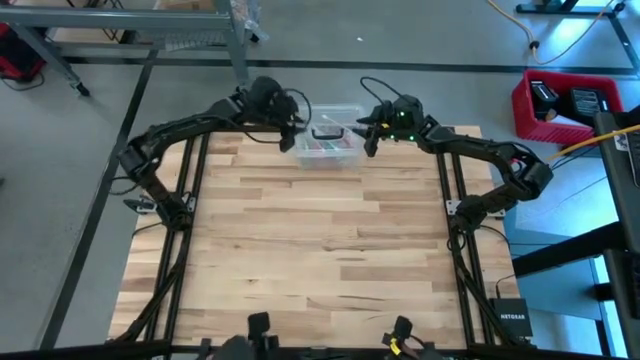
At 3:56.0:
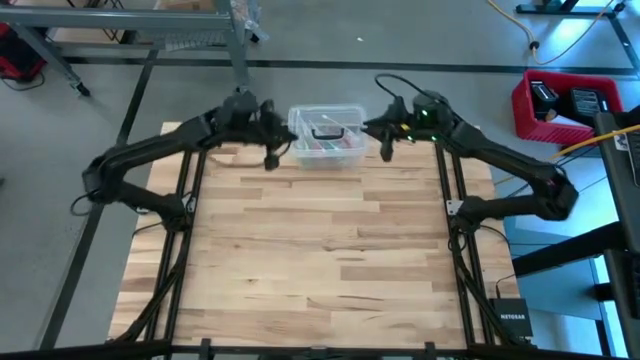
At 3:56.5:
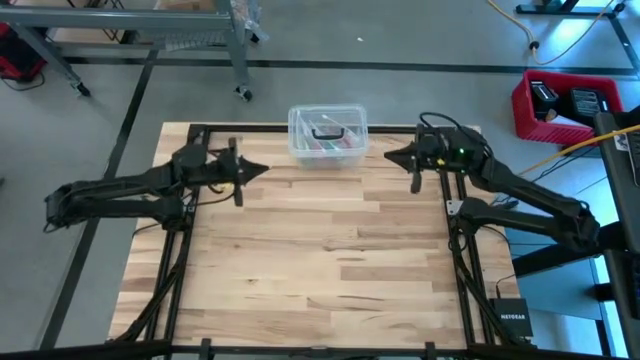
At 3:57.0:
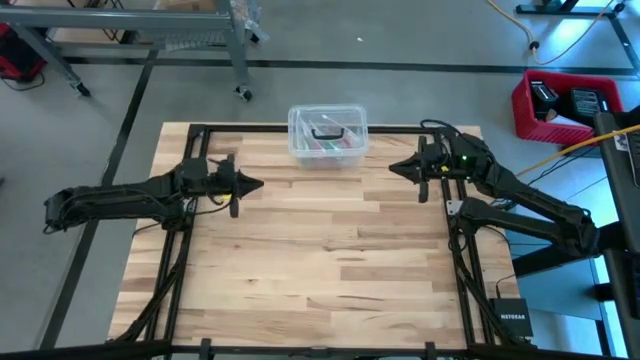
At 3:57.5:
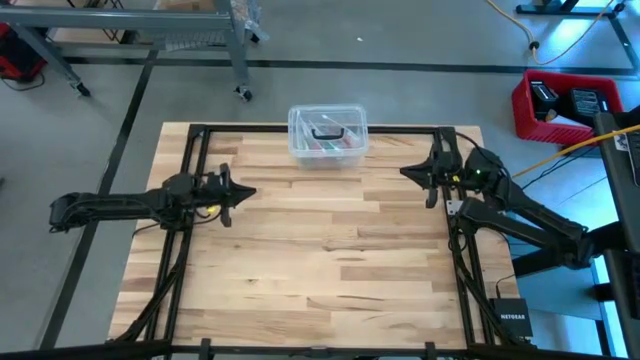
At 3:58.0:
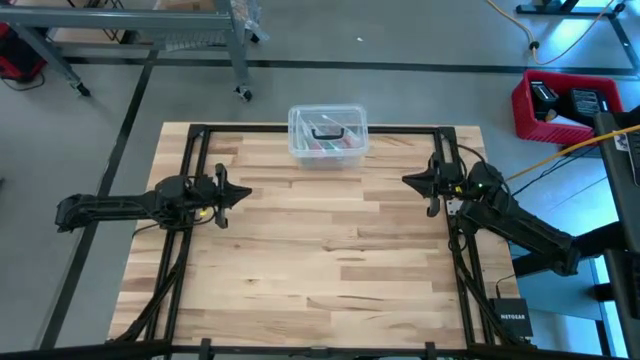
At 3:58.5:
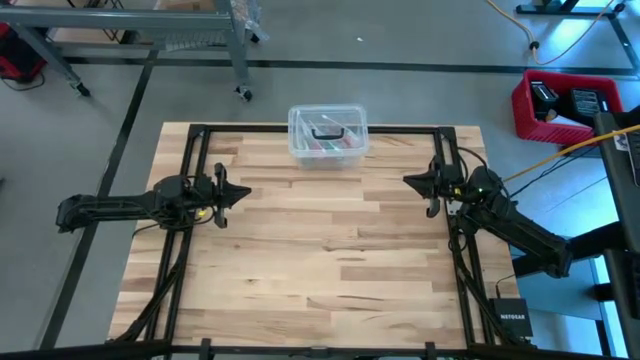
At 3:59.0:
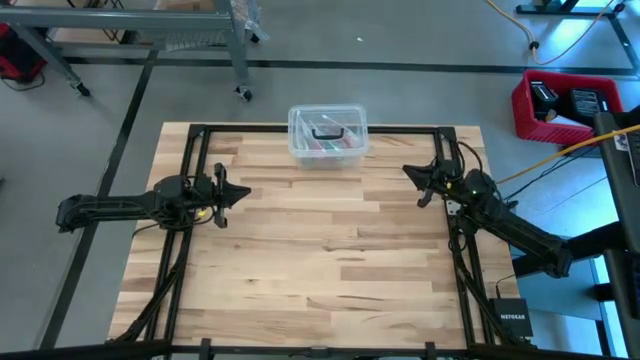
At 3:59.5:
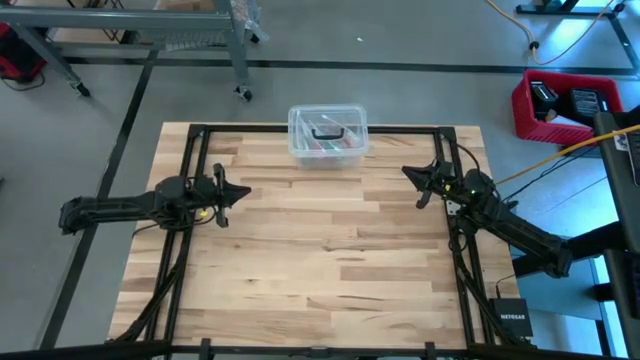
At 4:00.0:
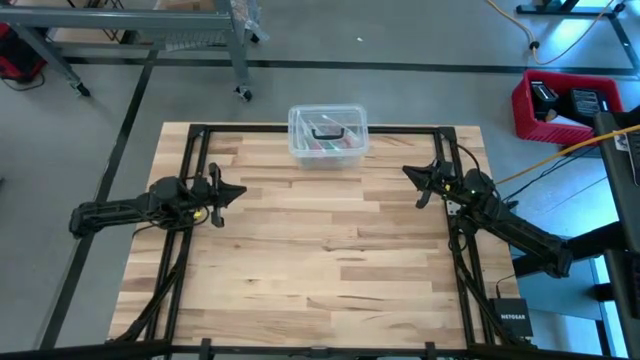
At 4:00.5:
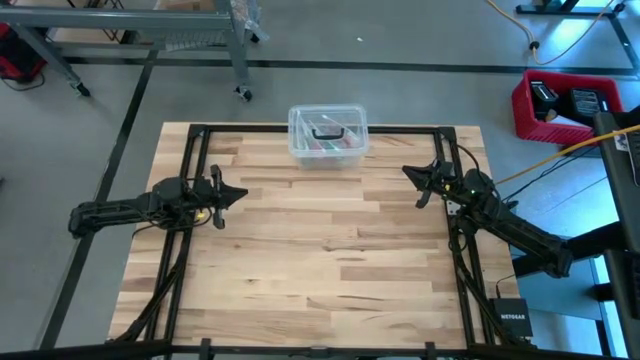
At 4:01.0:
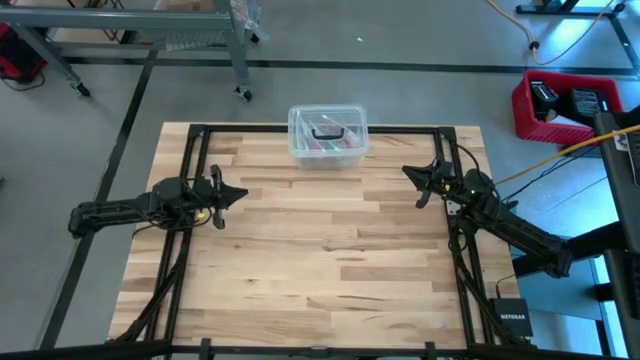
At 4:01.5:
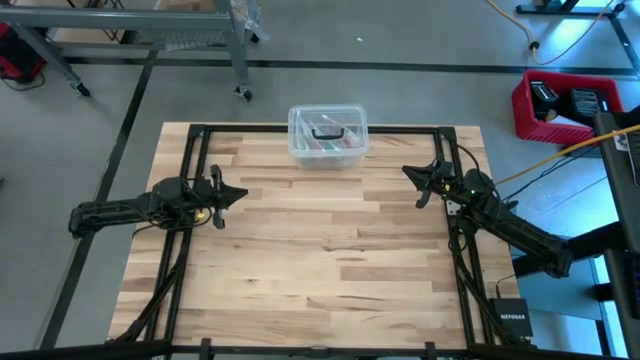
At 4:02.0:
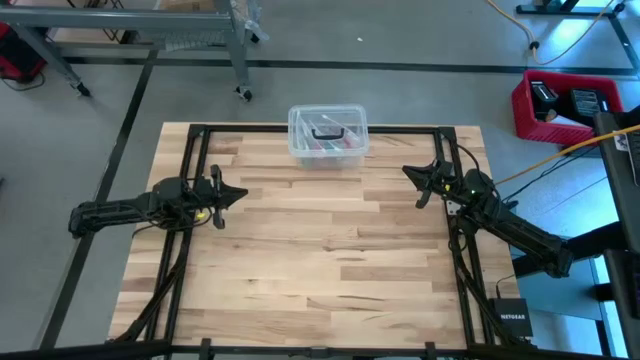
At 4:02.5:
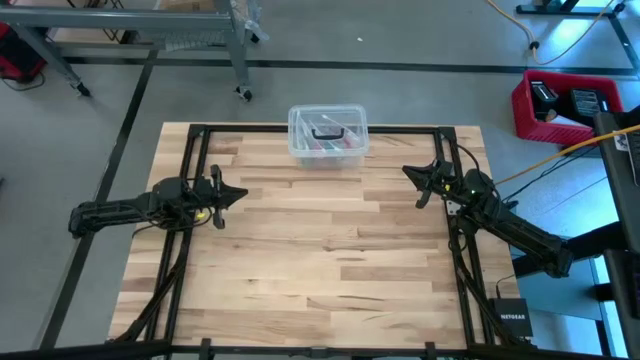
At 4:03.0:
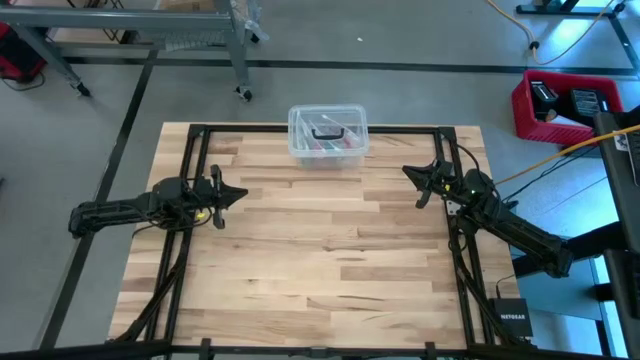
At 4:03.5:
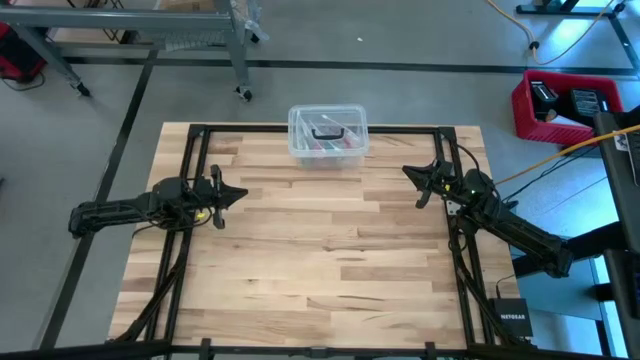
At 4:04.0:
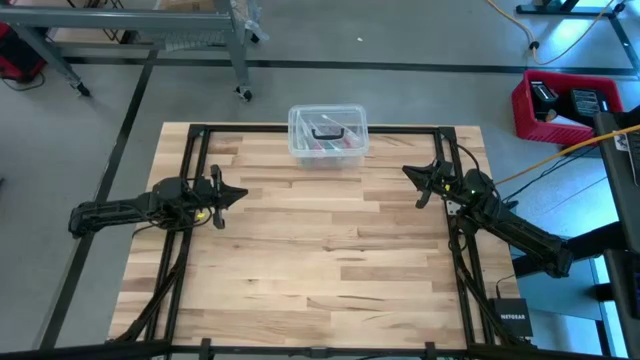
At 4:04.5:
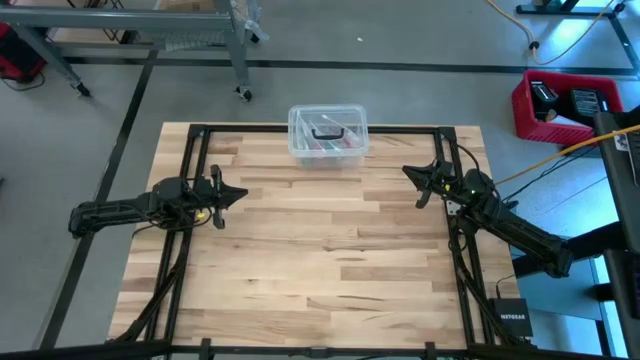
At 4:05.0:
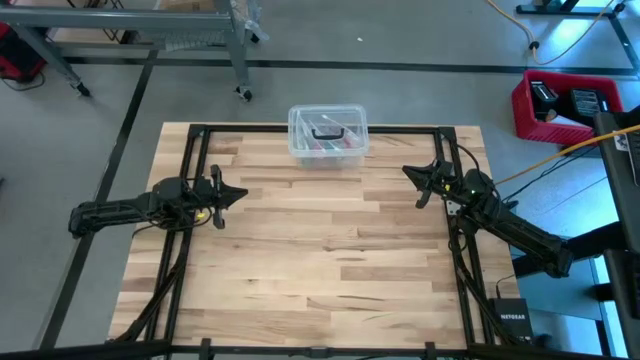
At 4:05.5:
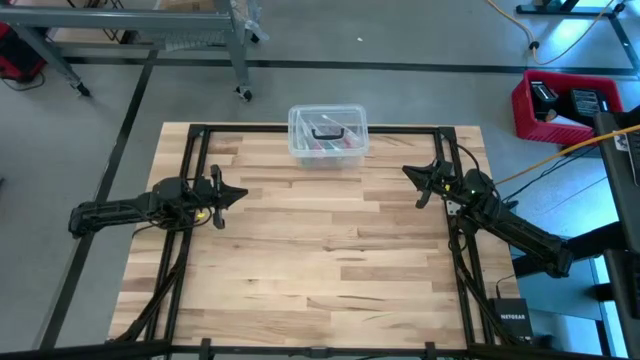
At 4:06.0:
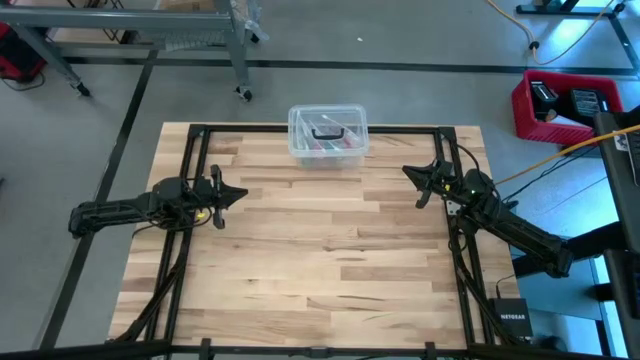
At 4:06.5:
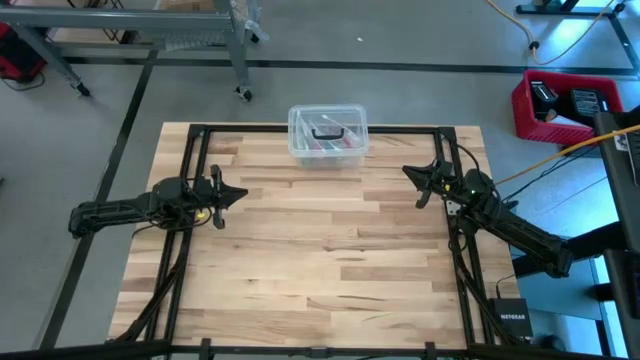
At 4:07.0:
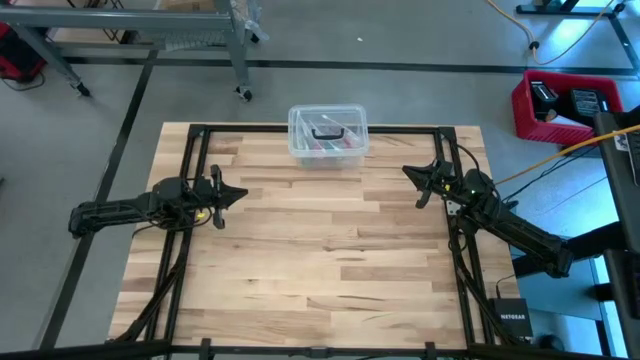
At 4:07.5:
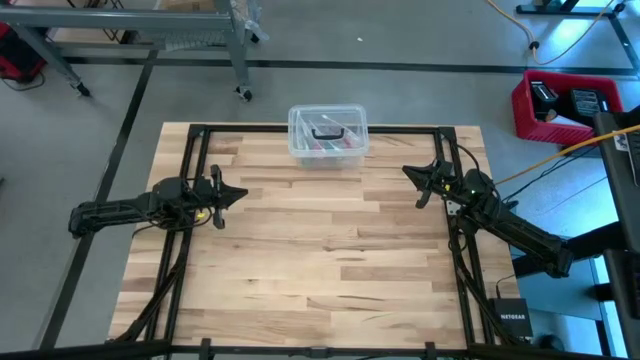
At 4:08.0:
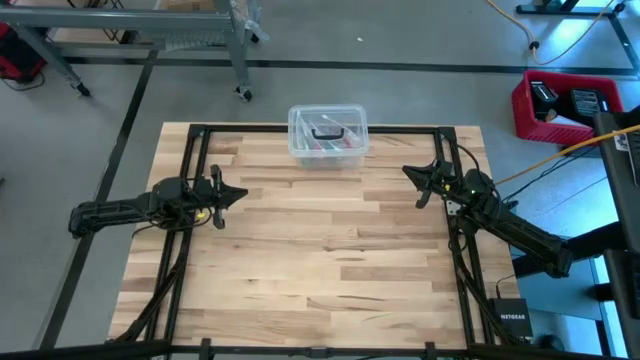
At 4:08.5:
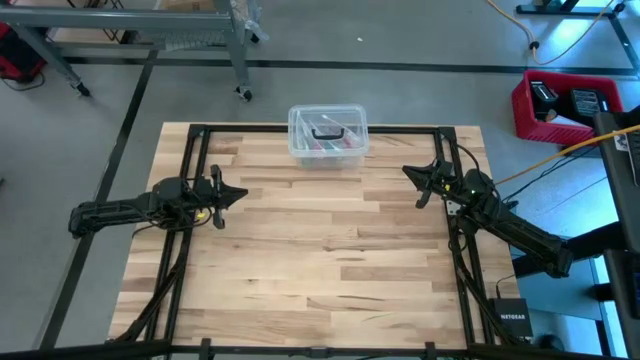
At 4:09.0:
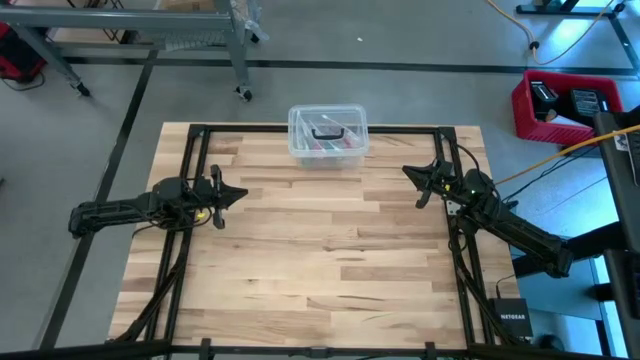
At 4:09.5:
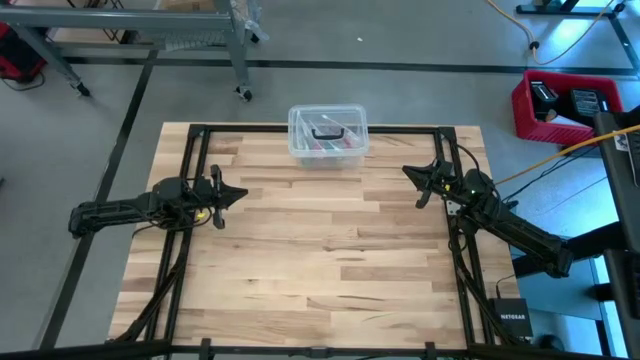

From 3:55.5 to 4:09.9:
Task: Roll bandage
Return to Home Position

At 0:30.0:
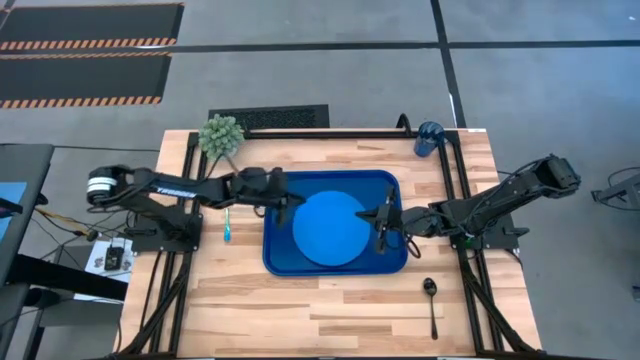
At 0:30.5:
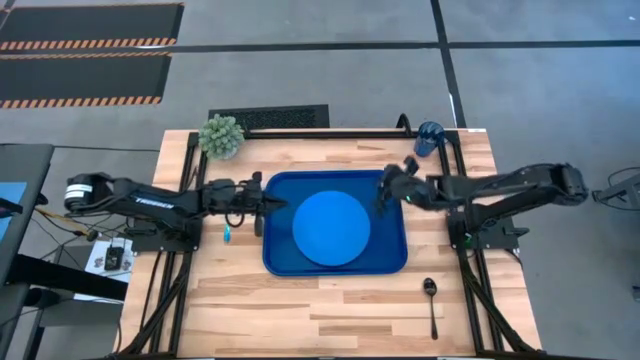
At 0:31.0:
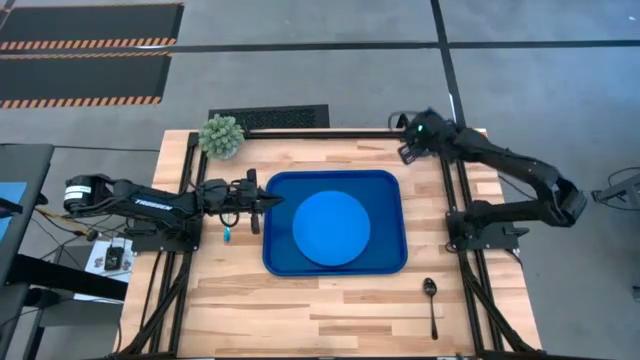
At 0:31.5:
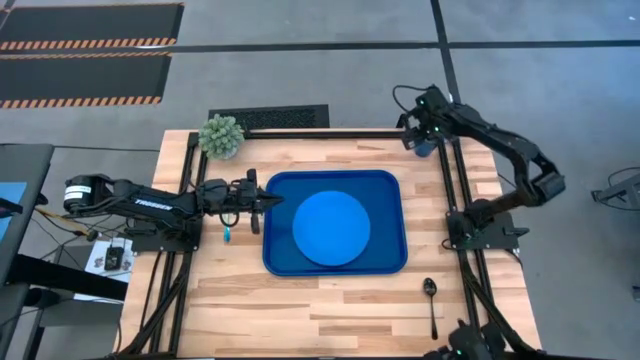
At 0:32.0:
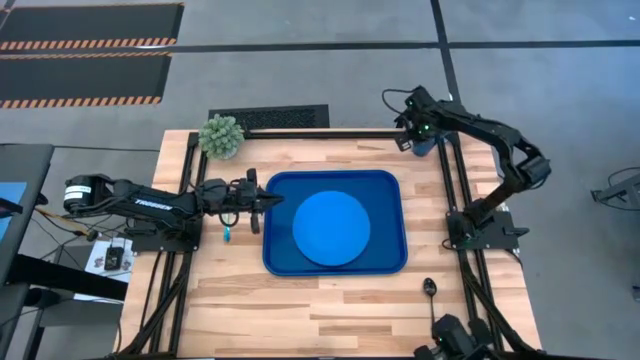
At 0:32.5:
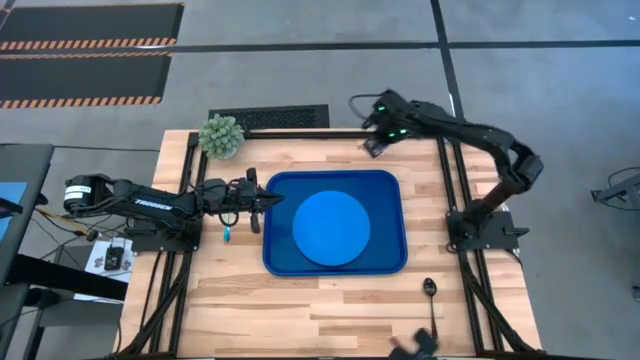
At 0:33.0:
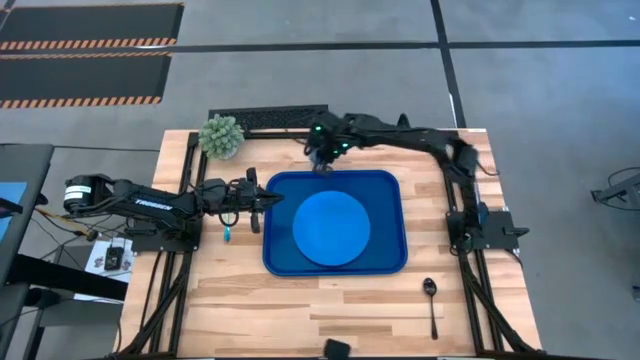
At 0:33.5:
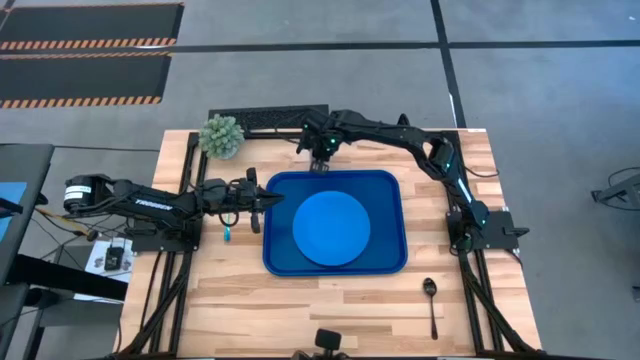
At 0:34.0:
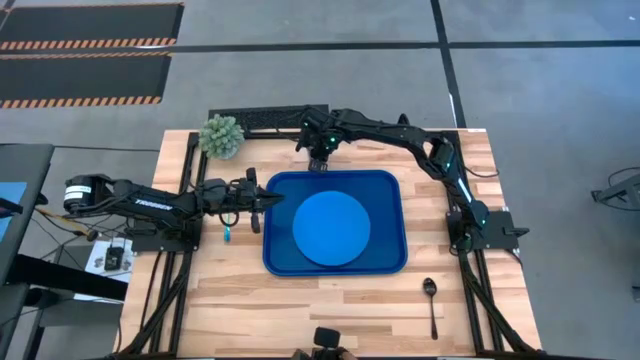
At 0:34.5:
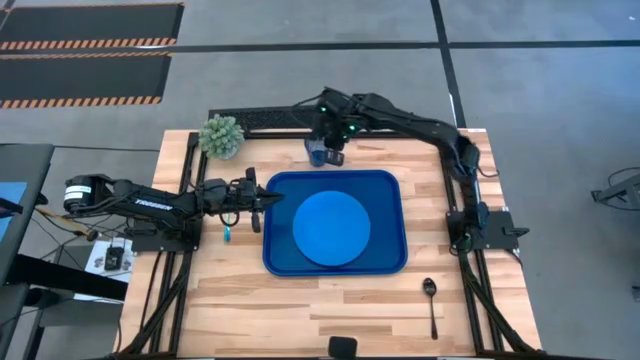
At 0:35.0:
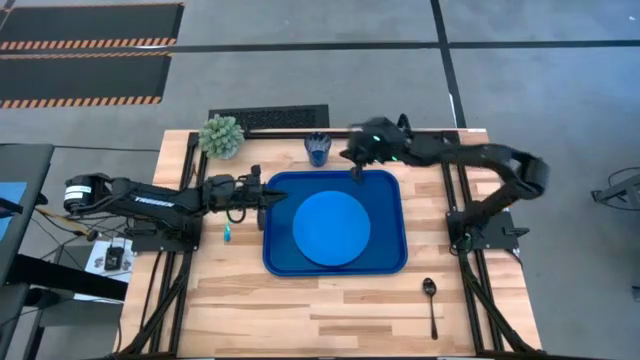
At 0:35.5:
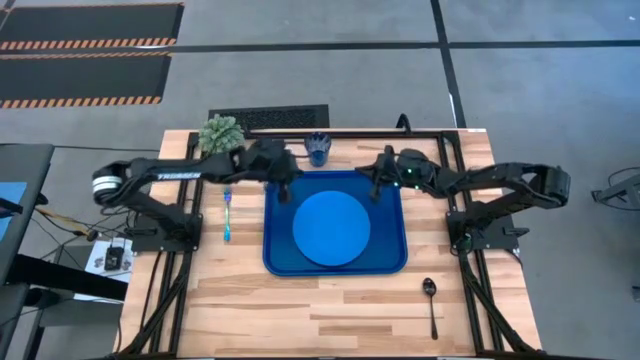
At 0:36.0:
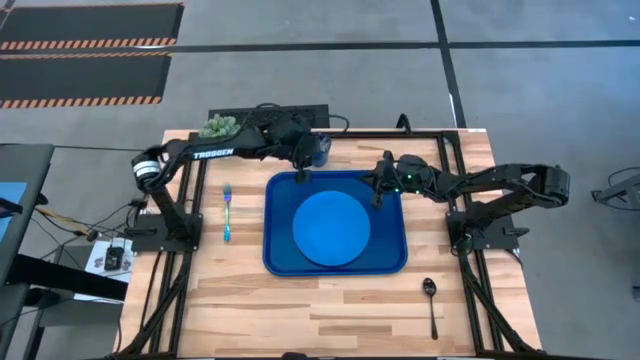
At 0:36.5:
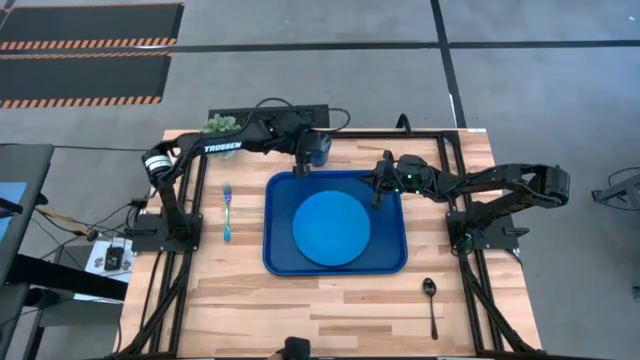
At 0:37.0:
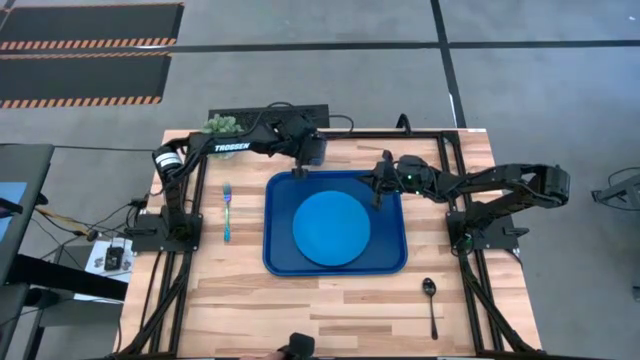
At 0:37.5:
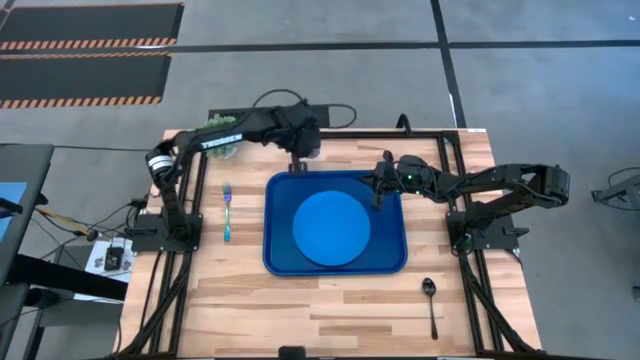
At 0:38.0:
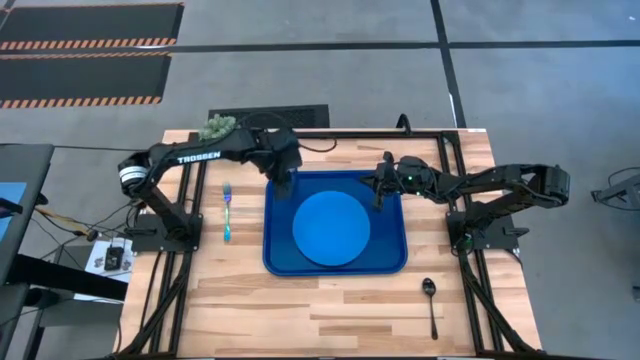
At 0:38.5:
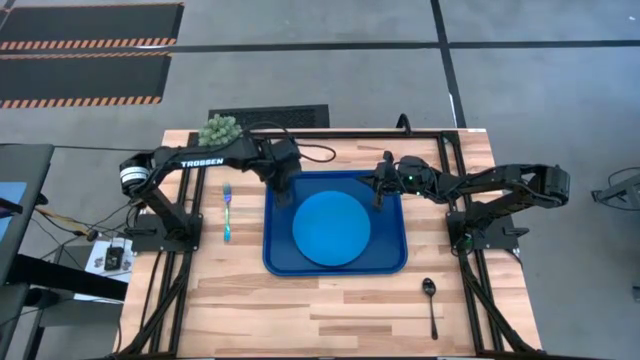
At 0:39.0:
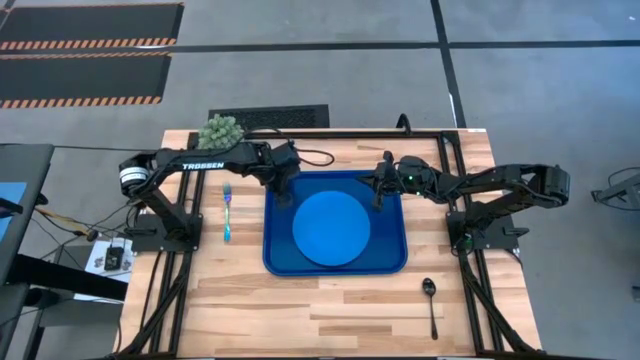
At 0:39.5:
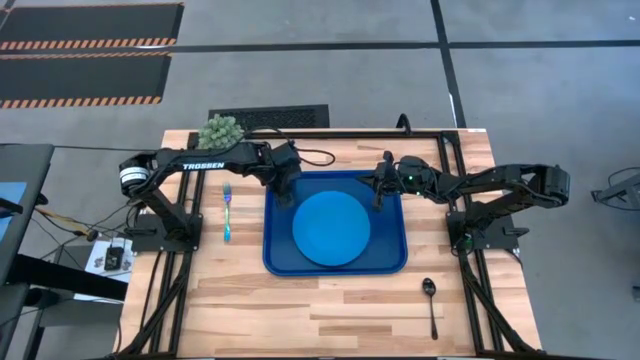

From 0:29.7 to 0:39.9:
Task: Pick and place plate/cup/fork/spoon on tray
Put the blue cup on the blue tray to the top left of the light blue plate
